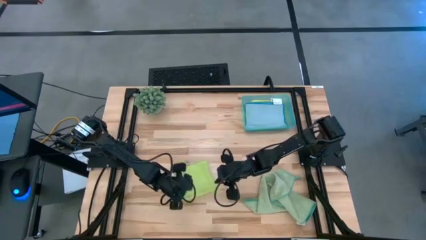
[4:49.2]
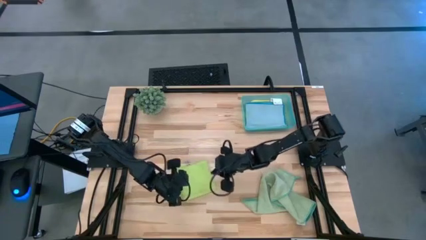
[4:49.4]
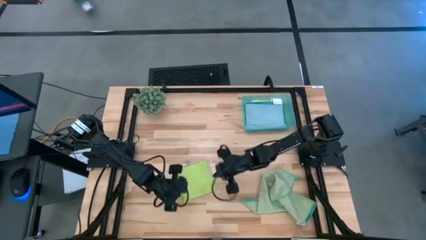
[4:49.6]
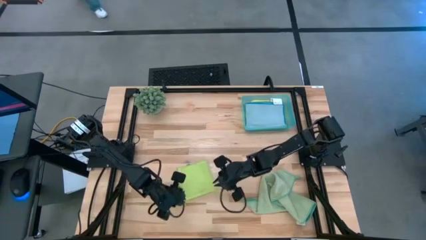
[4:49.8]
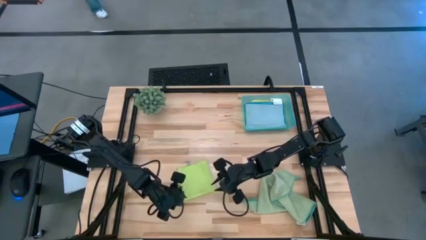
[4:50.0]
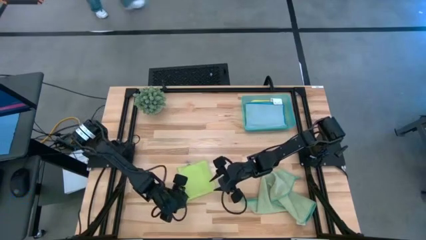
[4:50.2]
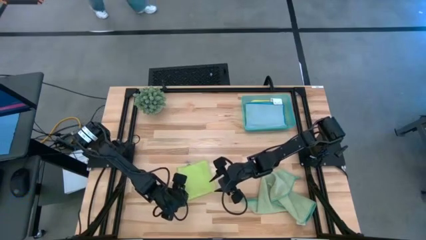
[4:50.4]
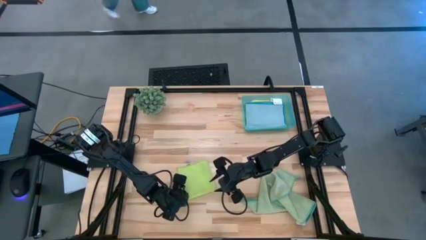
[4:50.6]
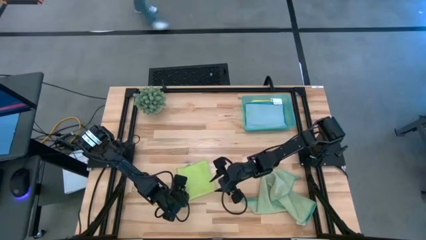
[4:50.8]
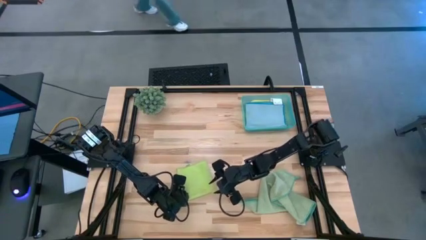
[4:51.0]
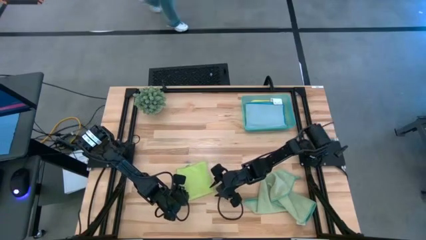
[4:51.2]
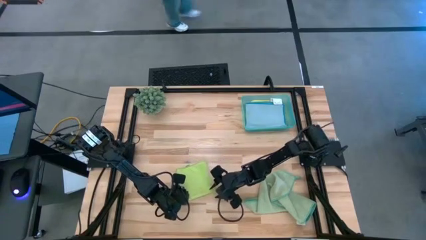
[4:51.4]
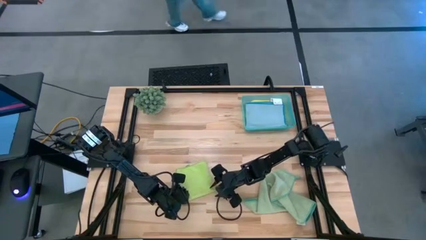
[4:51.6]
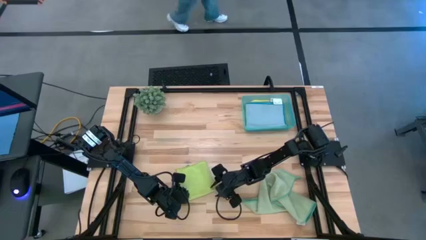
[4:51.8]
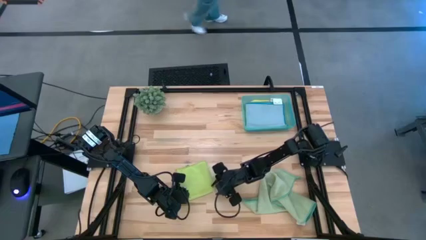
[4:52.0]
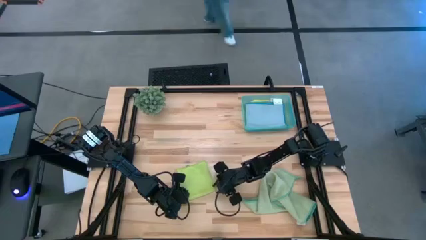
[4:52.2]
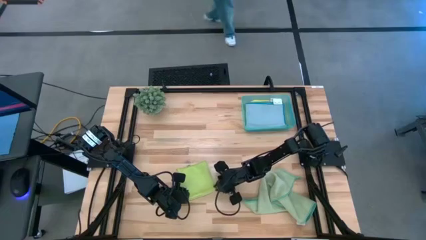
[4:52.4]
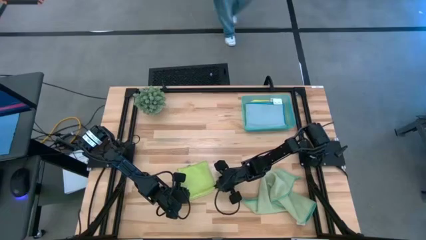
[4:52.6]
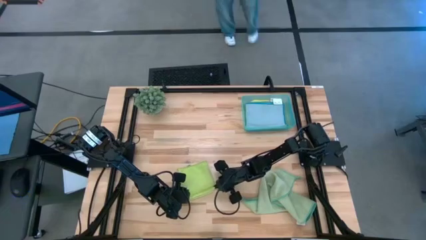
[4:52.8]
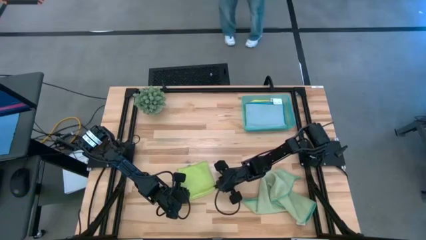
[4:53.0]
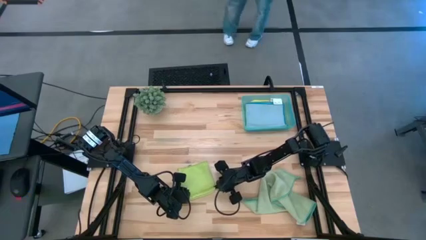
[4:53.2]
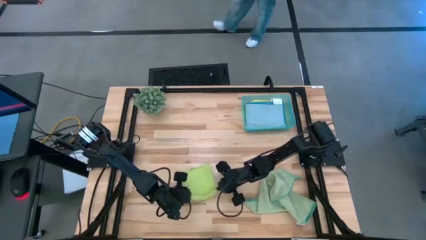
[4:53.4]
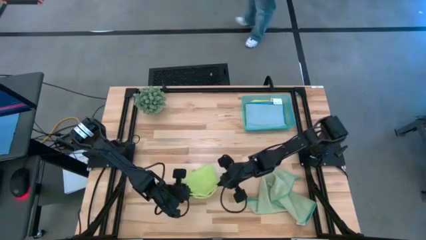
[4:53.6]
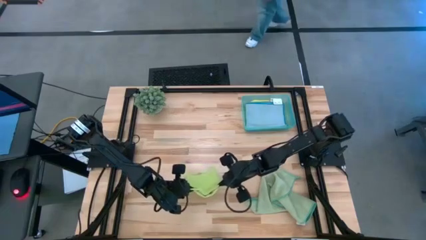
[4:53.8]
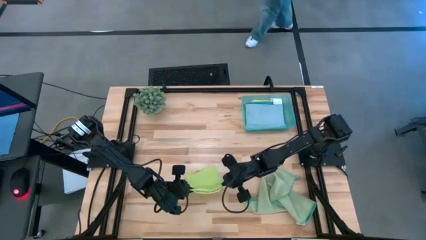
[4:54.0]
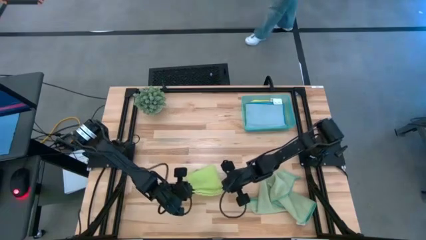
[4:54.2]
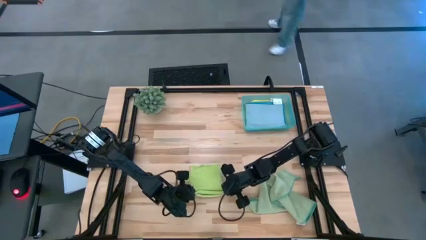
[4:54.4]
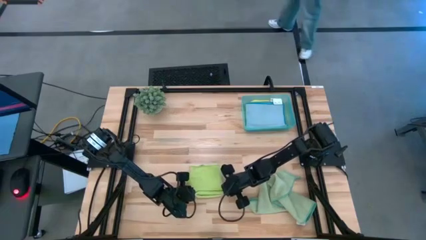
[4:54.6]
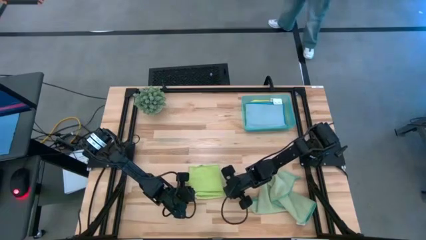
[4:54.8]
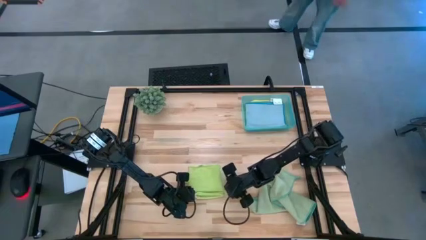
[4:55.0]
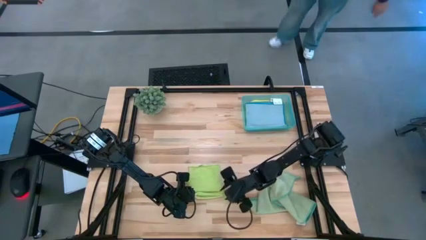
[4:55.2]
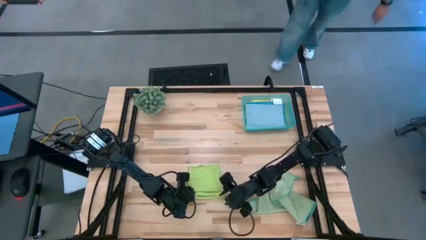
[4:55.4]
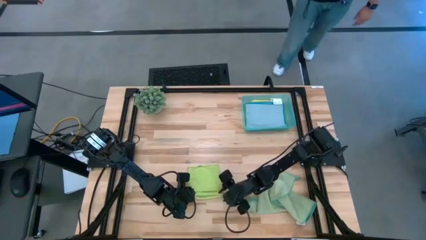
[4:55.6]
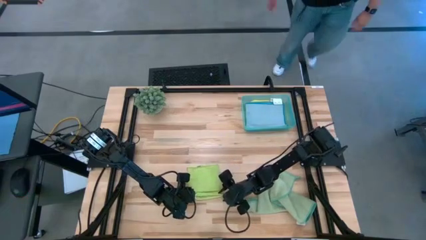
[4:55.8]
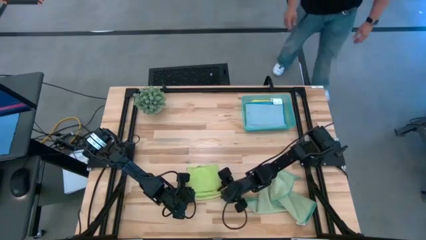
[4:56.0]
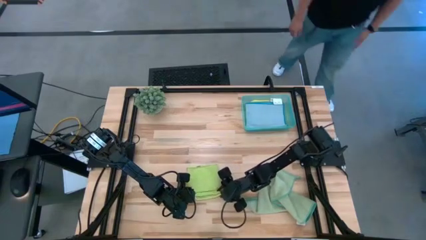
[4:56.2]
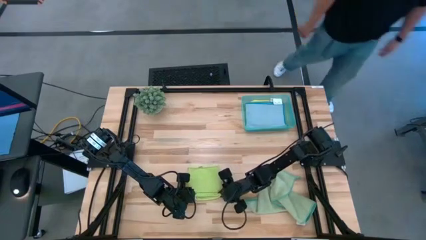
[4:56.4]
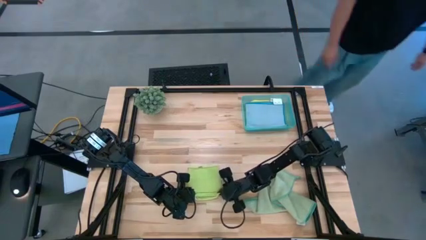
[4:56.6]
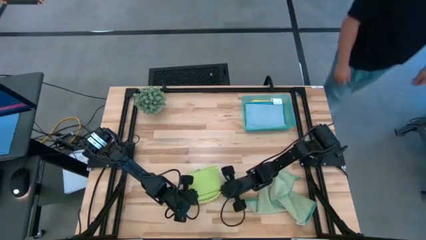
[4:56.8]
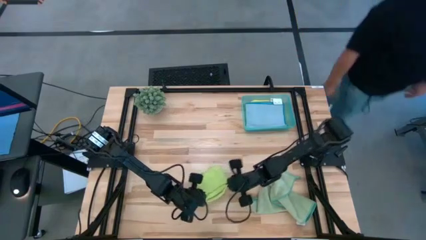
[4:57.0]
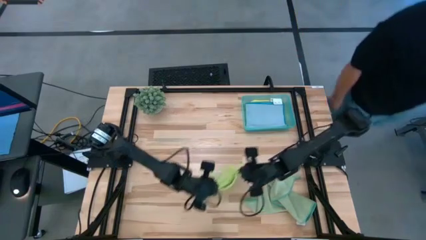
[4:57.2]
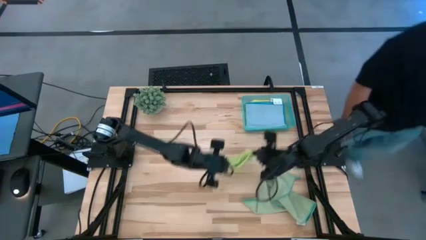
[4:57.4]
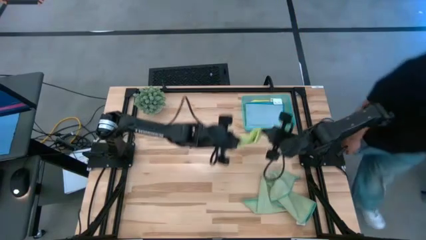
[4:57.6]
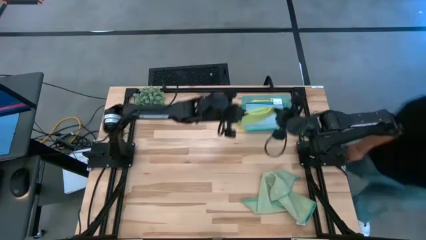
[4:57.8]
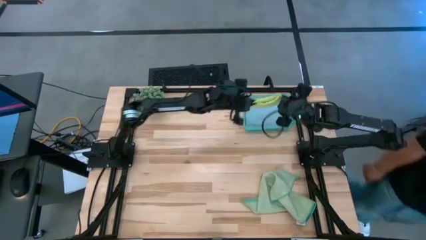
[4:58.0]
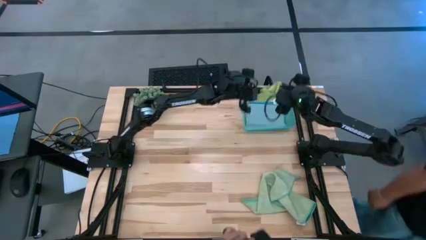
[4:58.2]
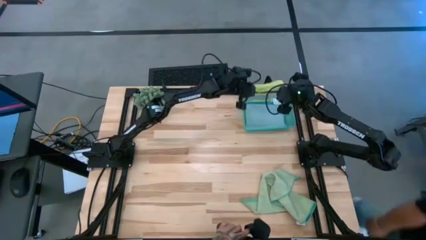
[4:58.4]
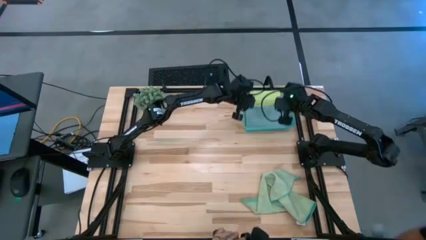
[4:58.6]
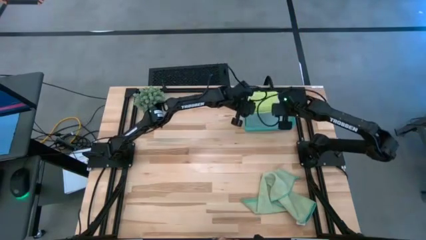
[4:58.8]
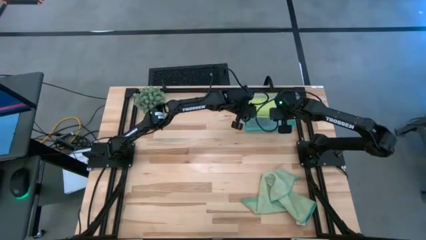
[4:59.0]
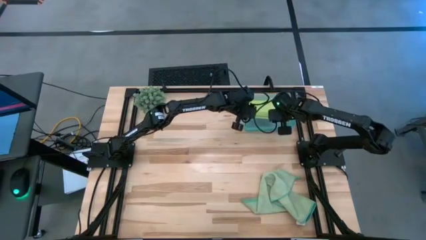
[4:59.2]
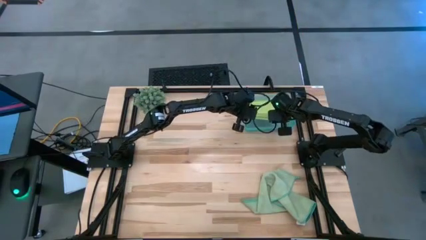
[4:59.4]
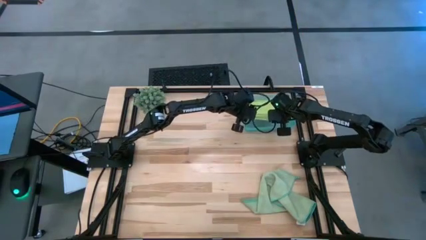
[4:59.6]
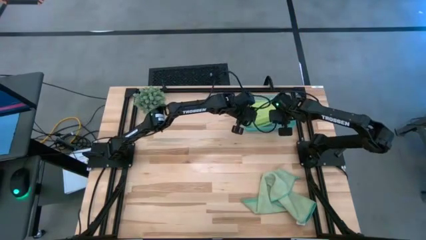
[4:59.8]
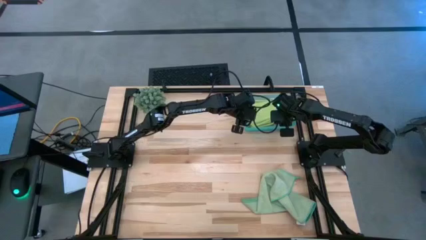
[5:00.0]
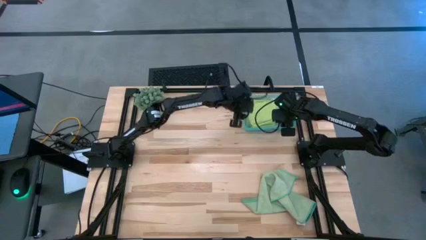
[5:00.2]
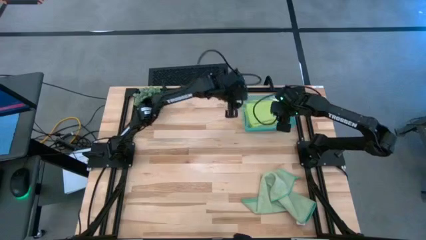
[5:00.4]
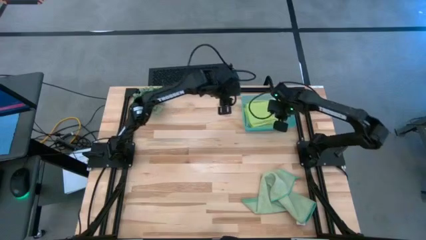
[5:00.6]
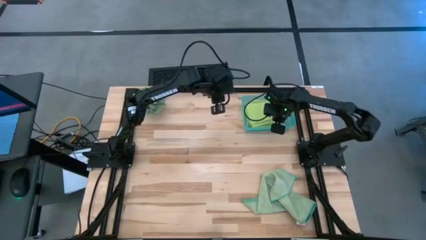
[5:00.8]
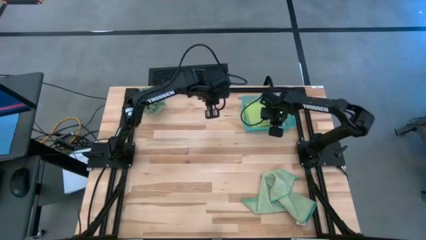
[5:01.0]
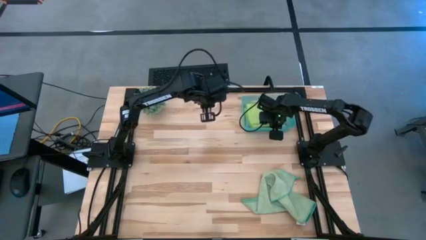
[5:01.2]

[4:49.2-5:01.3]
Task: Fold microfiber towels
Stack the green microfiber cloth on top of the blue microfiber cloth in the blue bin

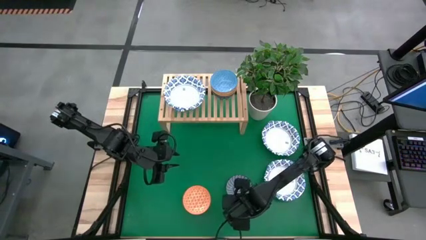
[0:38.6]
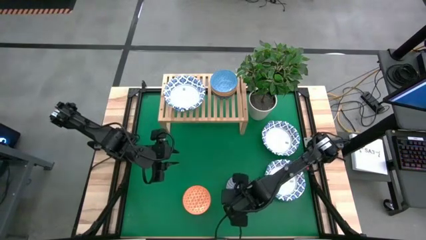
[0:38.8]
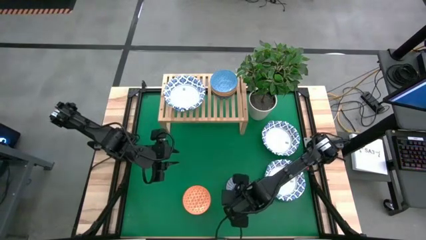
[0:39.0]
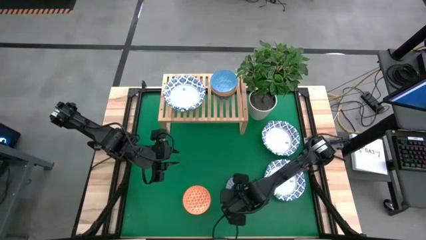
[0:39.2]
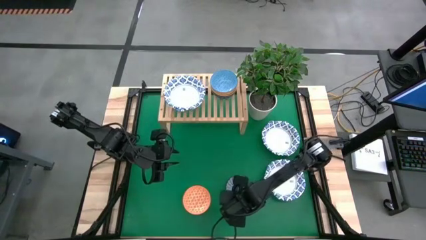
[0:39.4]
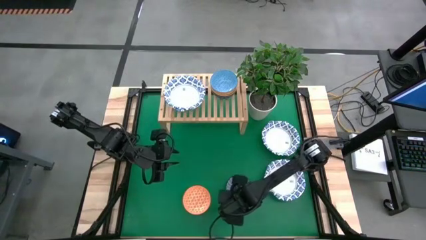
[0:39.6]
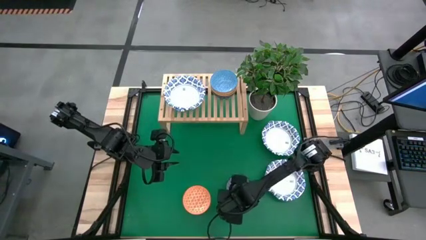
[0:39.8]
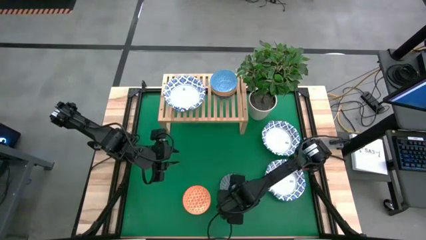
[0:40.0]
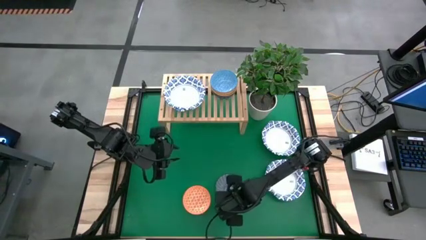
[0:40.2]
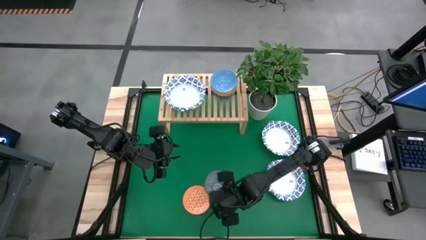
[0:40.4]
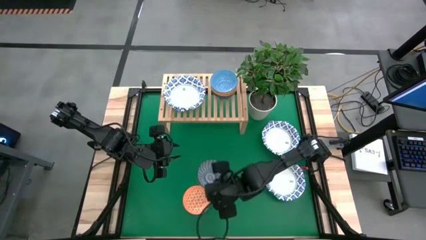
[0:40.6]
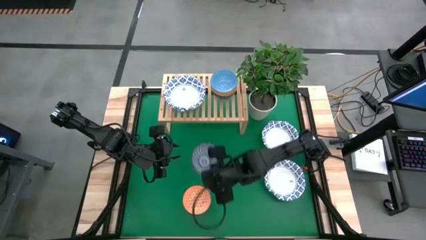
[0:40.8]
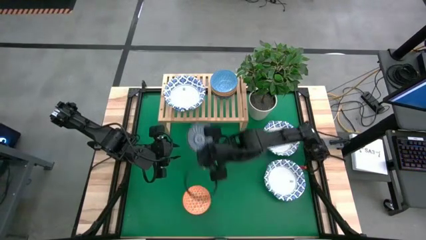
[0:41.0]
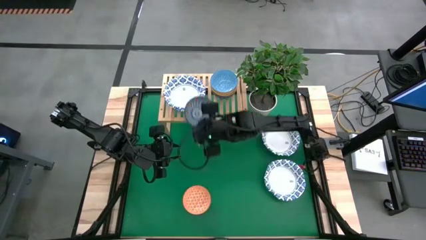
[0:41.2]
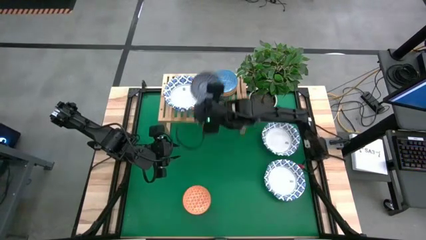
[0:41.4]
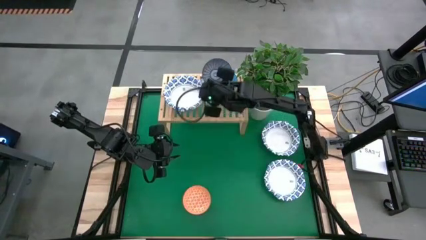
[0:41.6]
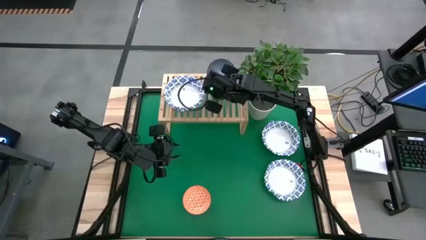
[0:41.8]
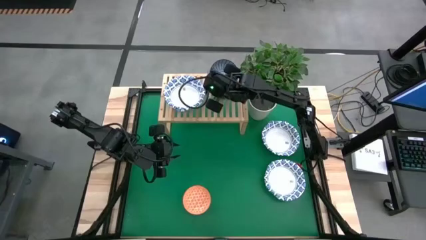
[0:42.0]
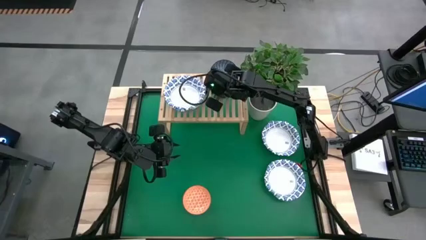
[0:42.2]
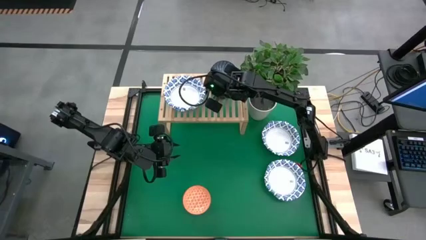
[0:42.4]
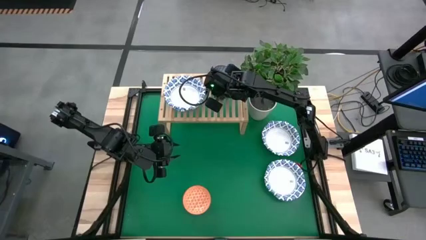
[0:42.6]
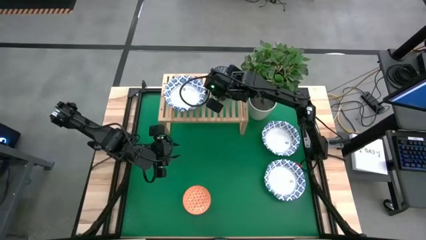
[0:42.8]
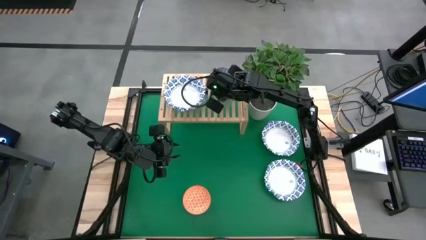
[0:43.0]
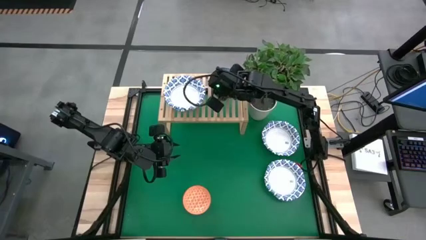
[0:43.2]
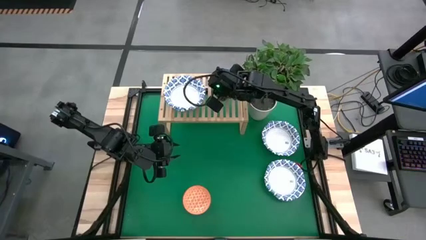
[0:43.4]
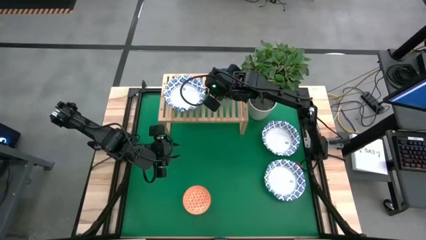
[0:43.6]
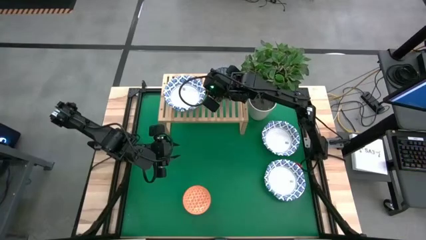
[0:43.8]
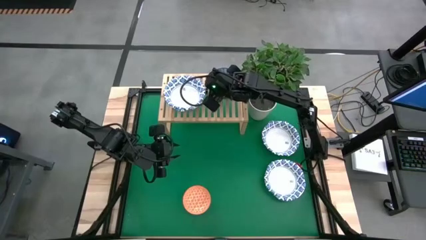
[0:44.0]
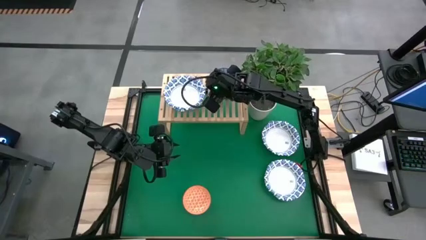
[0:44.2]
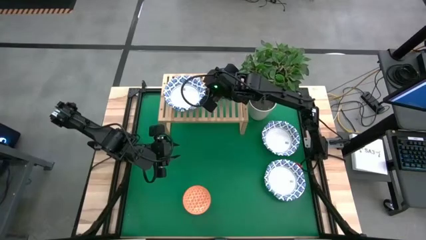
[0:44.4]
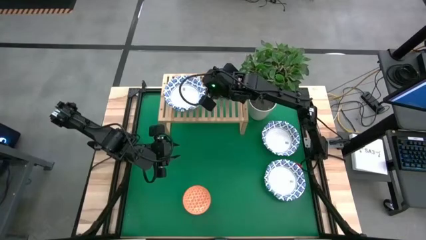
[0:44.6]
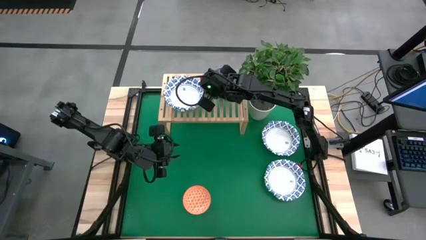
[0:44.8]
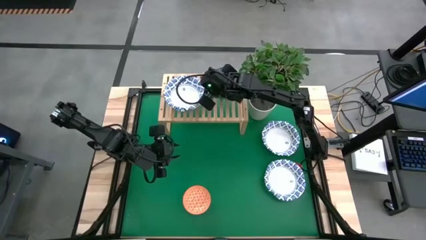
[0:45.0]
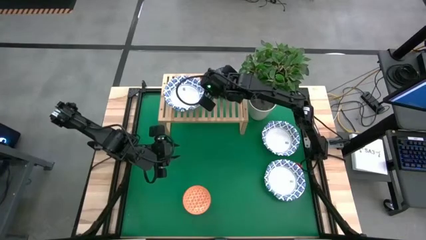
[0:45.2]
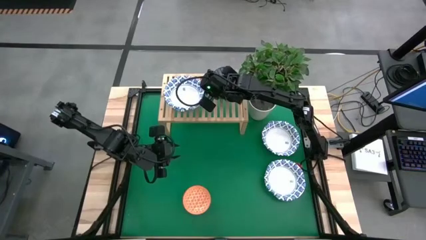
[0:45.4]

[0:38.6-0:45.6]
Task: Place and stack bowls onto a shelf
Stack the small blue bowl on the small light blue bowl on the shelf
